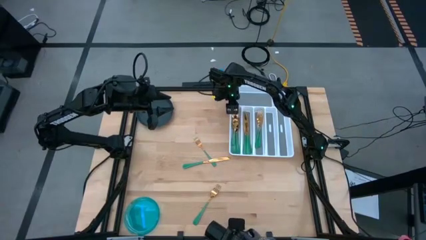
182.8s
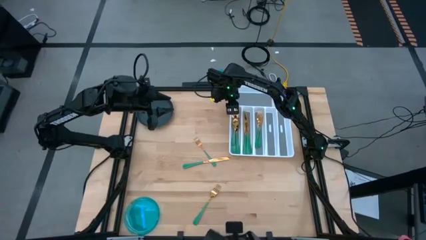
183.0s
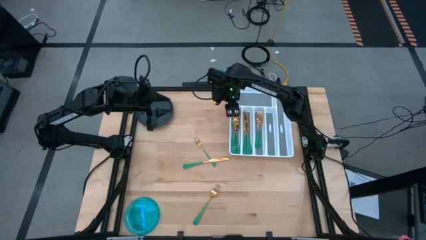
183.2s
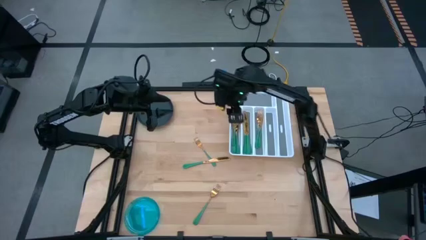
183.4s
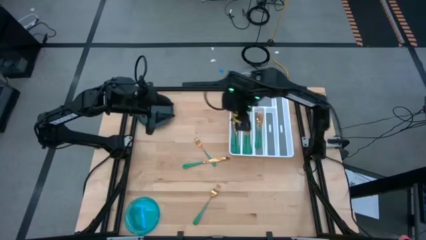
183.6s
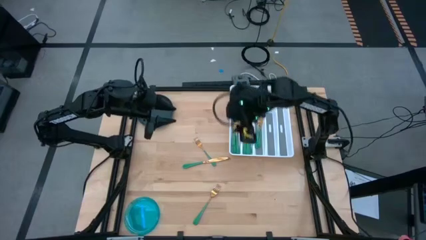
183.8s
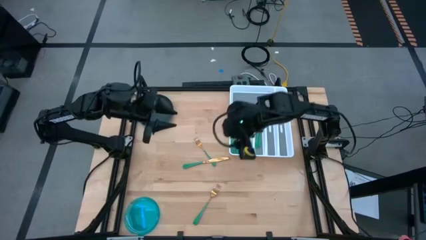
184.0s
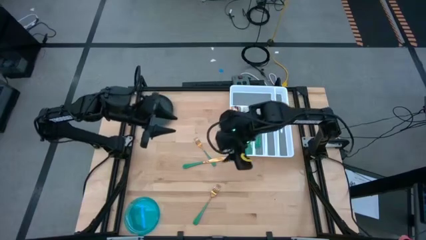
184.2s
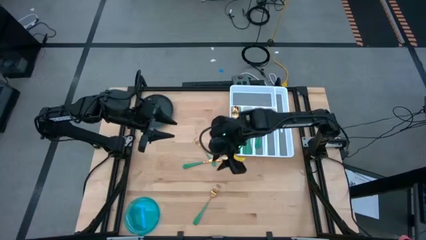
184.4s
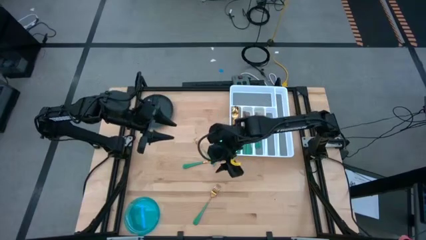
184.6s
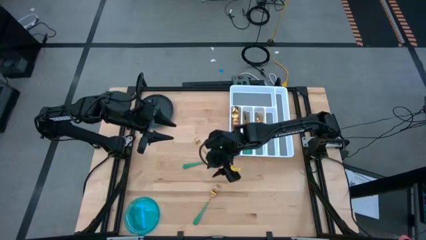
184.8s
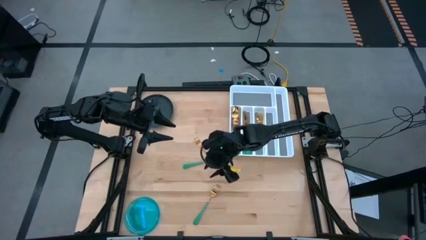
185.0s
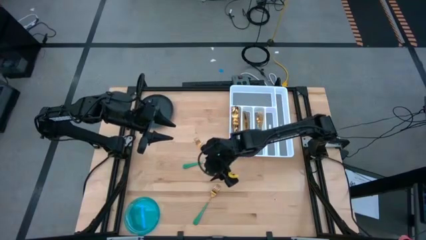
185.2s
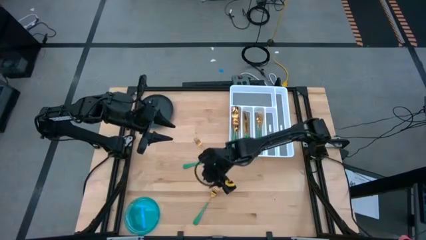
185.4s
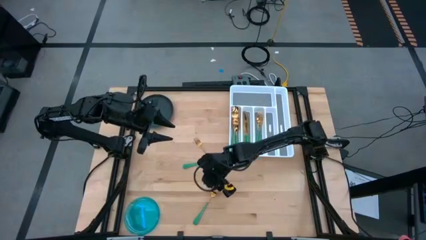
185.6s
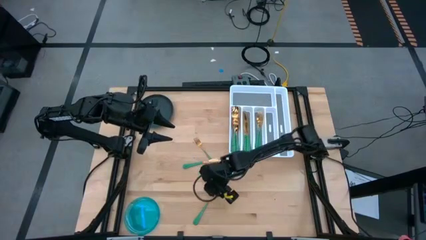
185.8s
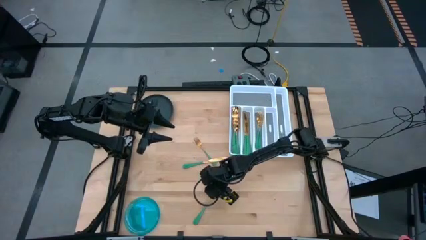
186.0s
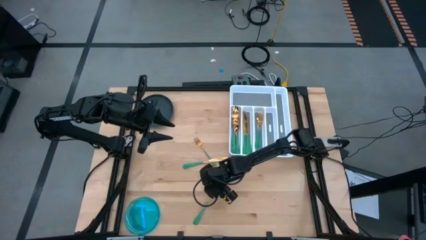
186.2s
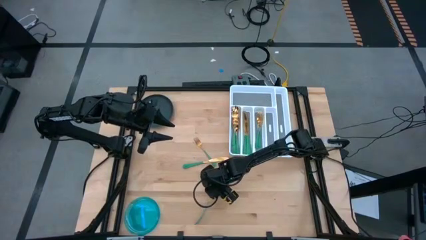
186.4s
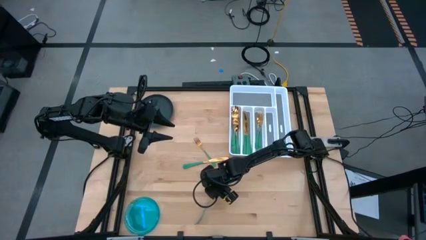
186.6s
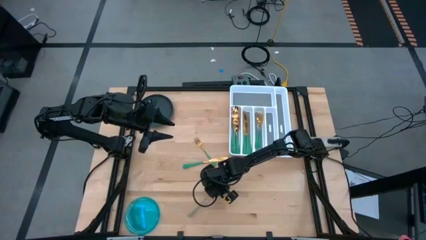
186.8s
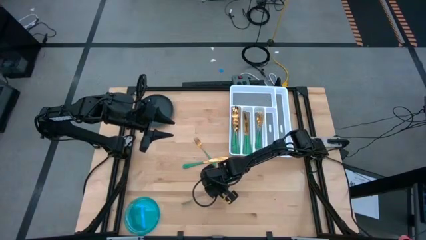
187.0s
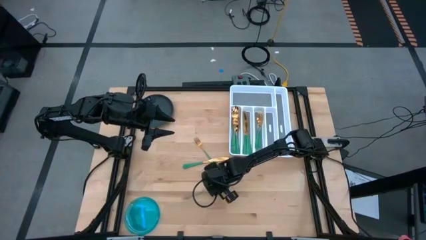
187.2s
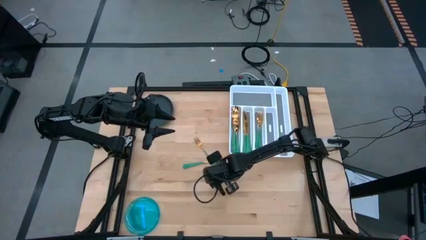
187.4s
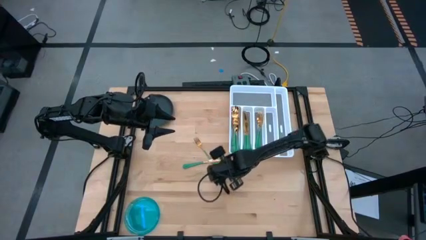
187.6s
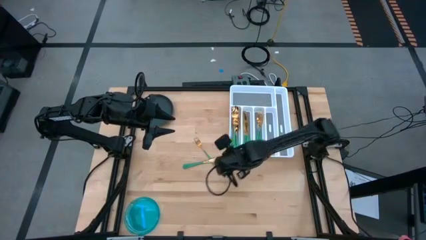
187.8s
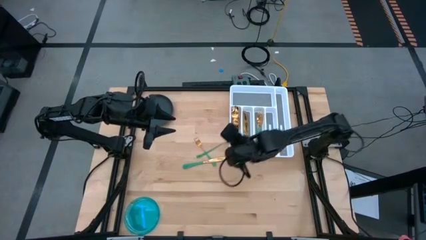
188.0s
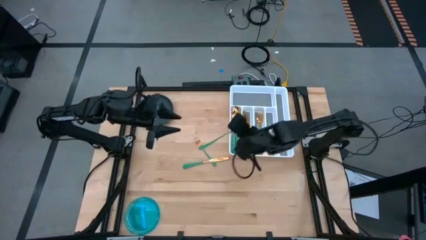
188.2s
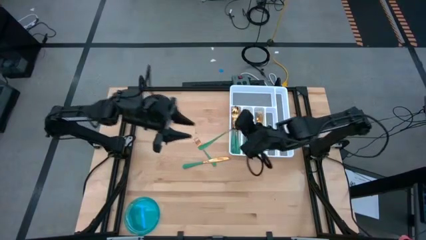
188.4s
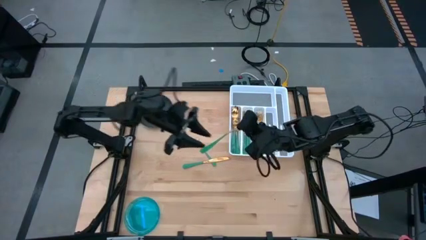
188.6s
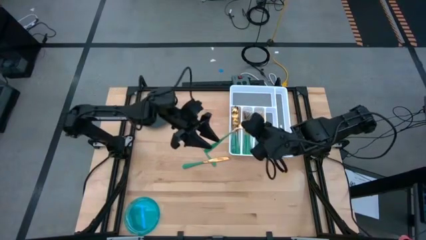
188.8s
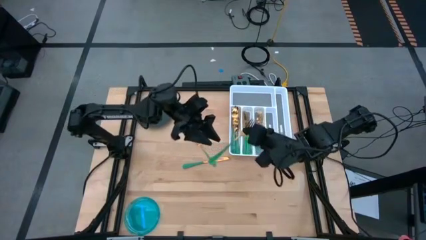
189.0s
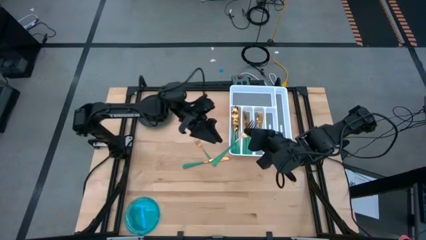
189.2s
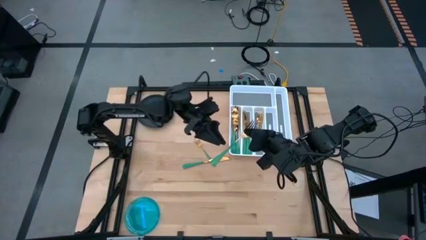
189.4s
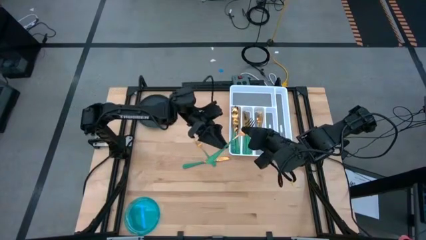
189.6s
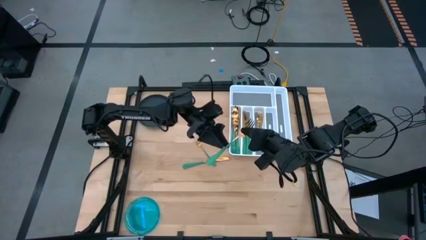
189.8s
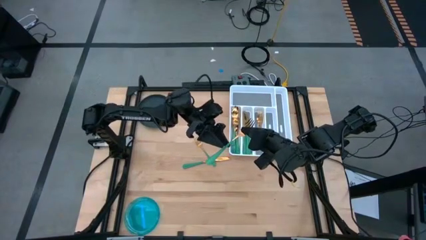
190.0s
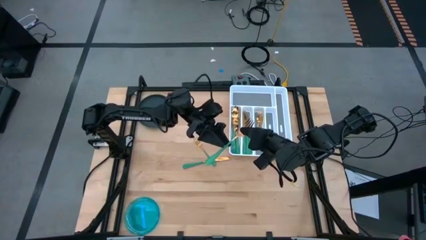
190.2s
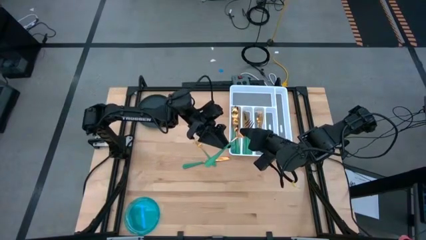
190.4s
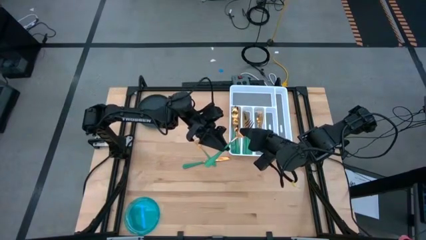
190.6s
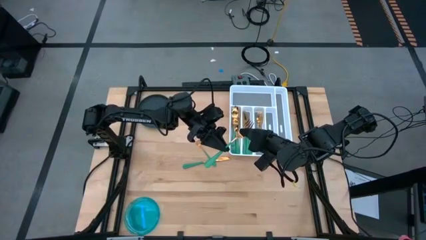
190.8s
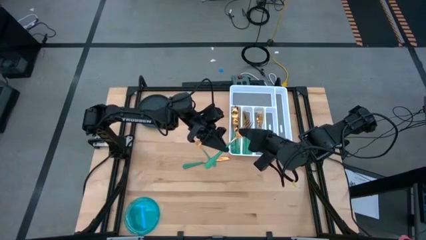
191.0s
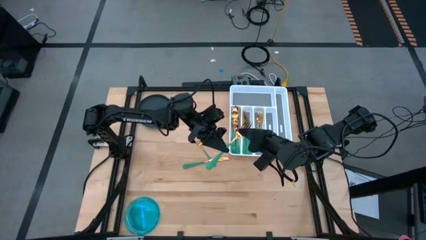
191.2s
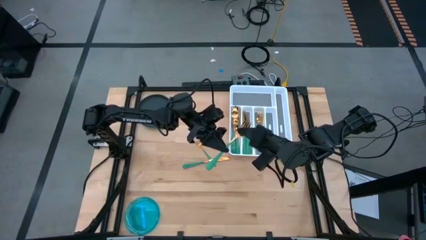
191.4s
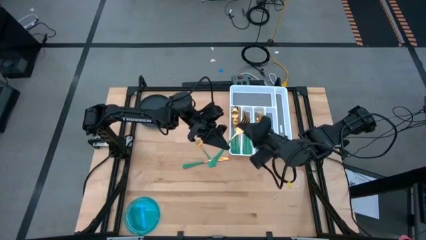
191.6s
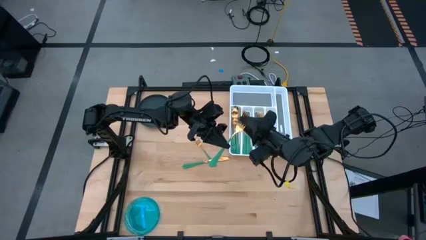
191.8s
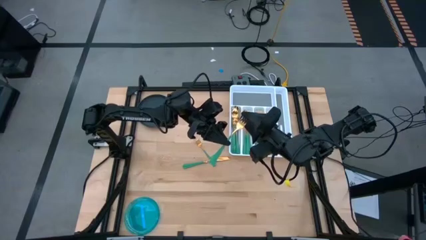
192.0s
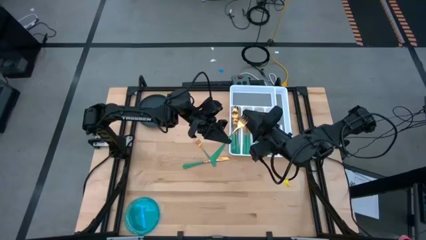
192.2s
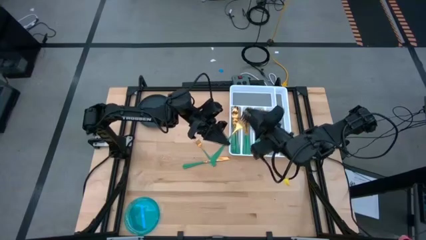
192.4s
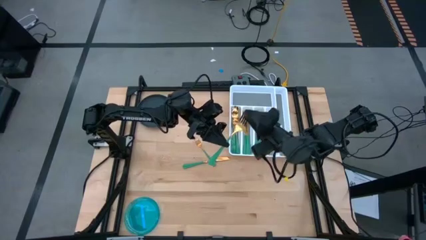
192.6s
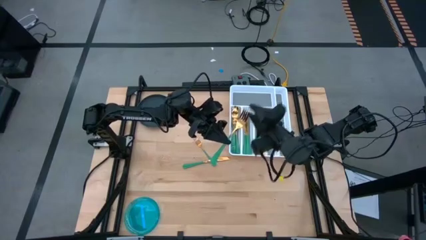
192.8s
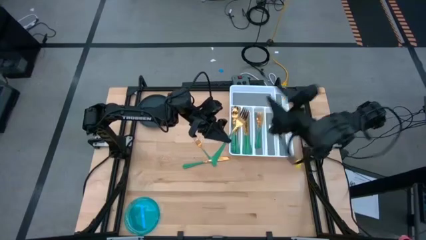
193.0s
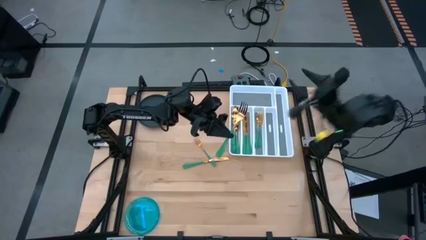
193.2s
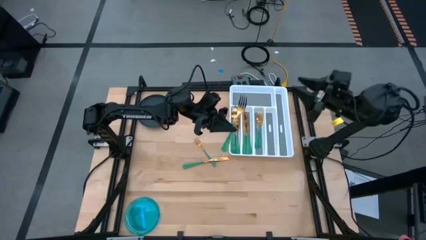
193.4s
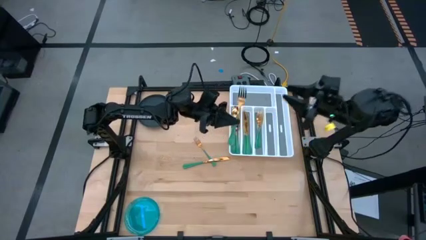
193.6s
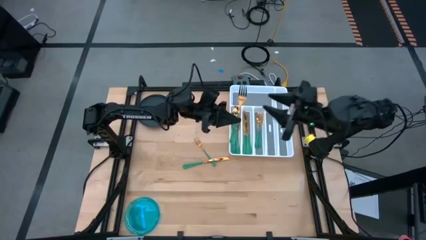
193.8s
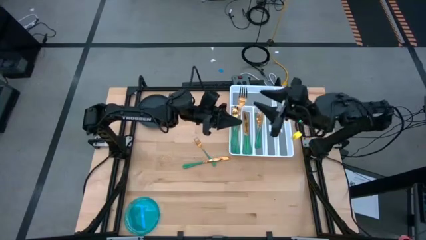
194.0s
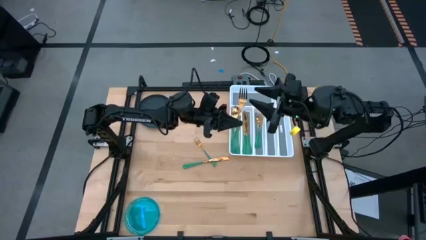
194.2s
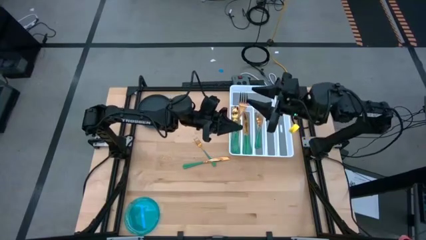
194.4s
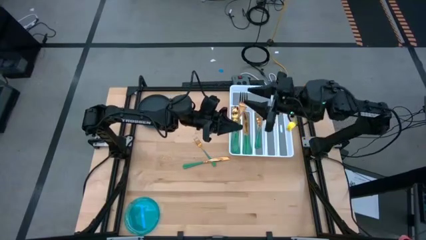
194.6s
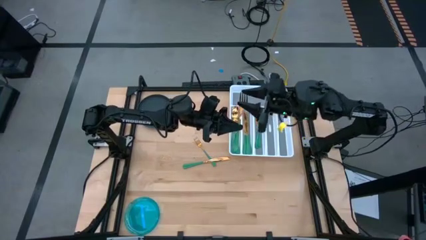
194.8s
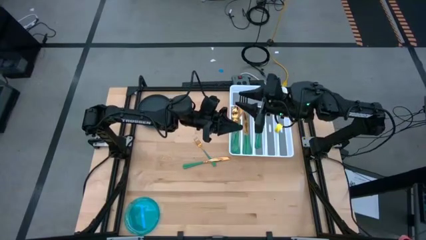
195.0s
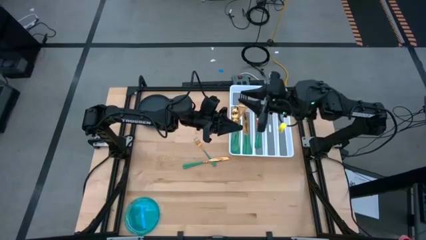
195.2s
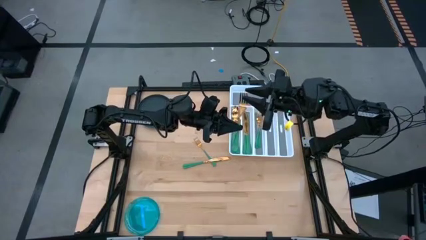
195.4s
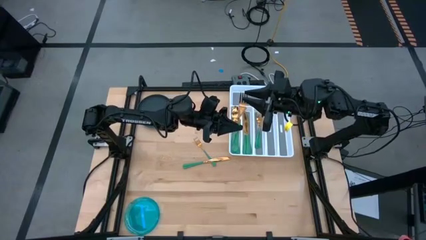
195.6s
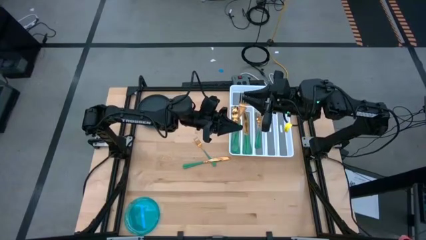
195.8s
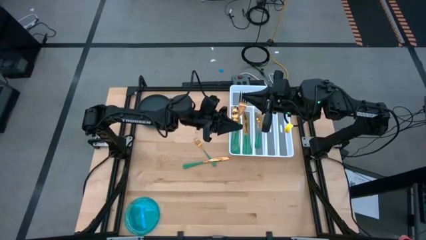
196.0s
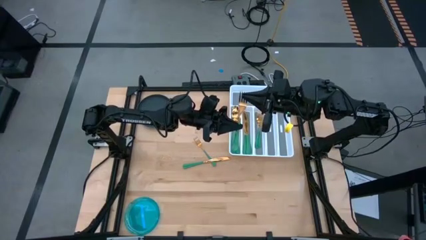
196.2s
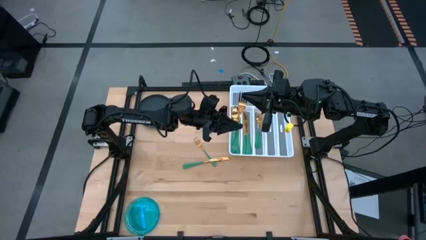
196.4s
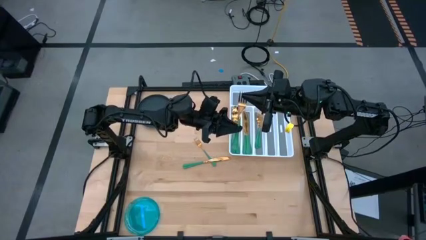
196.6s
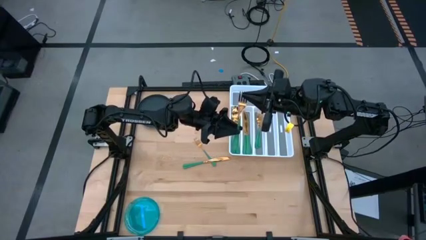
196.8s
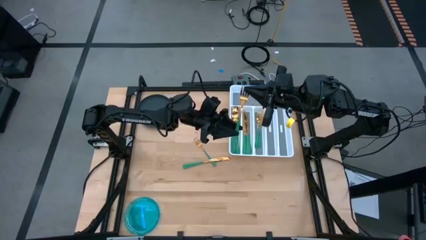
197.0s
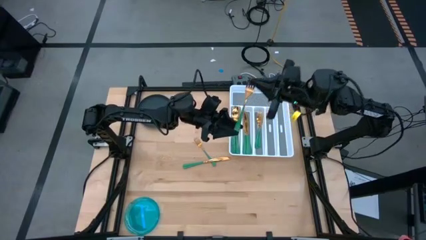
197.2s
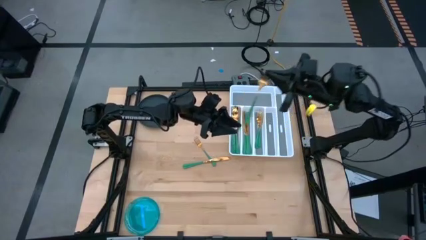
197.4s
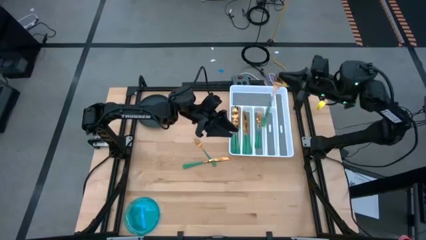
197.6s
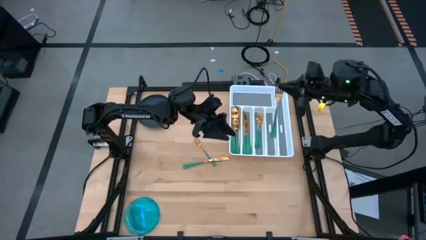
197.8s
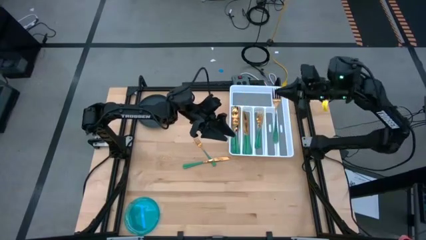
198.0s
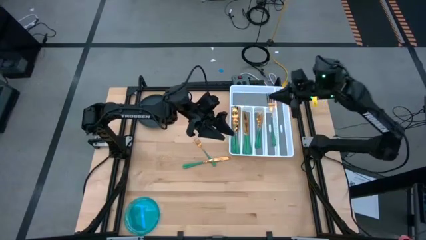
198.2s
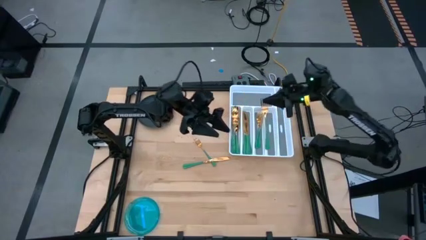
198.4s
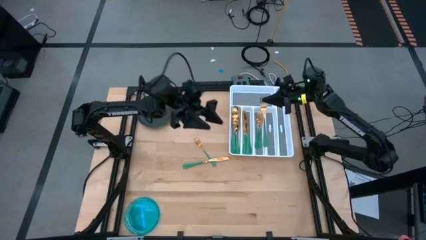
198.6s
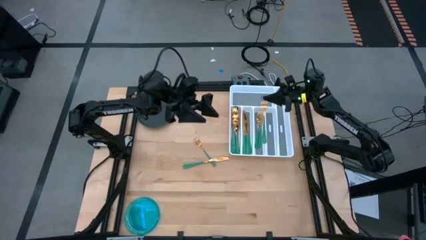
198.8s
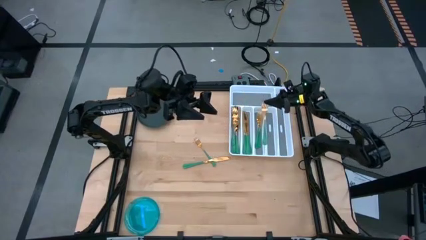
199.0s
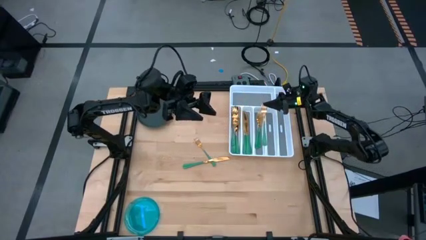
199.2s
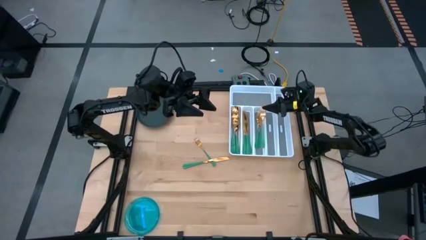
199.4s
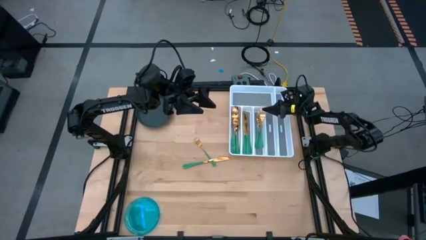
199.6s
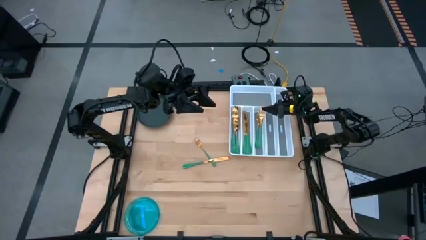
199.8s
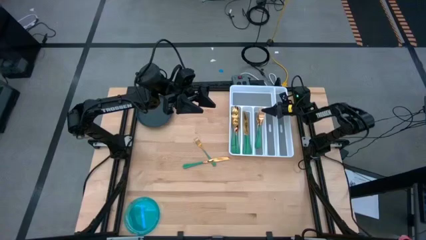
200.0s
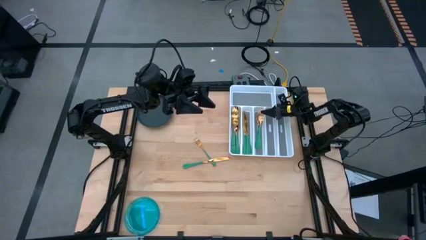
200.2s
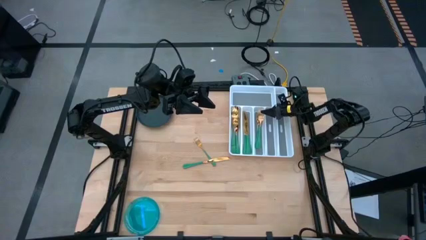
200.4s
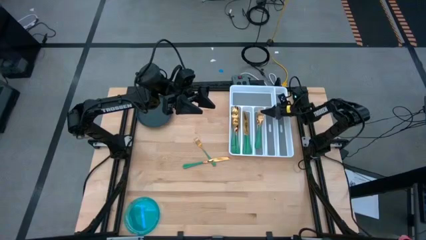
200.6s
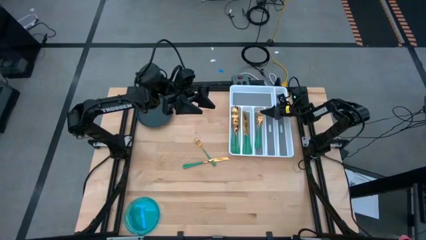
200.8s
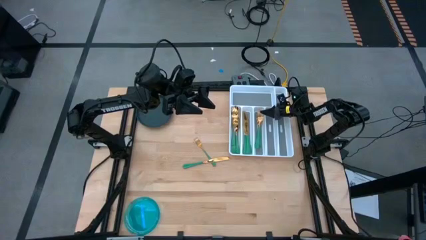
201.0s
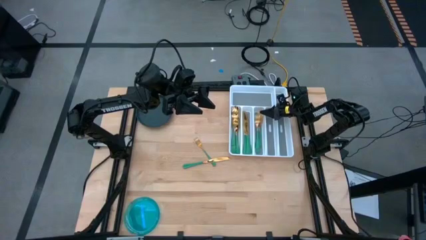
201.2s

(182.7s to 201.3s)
Task: Sort silverware
Put the green fork on the silverware organizer
